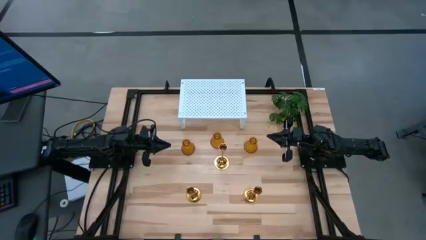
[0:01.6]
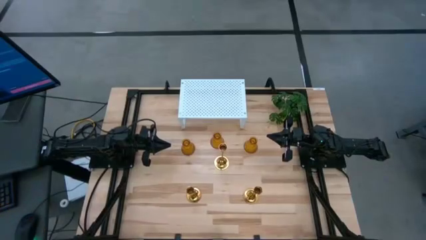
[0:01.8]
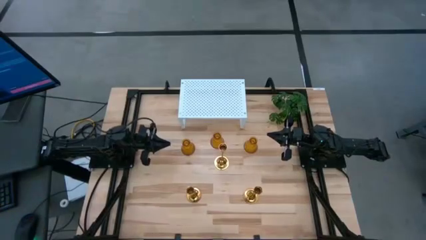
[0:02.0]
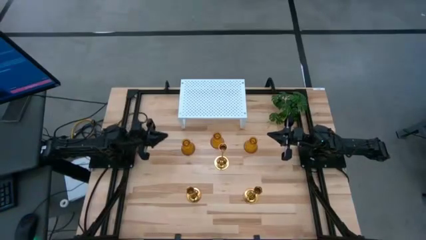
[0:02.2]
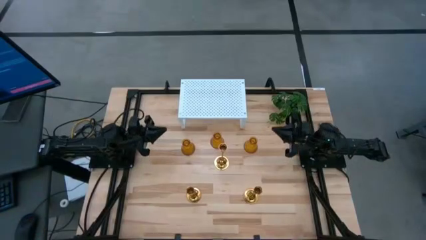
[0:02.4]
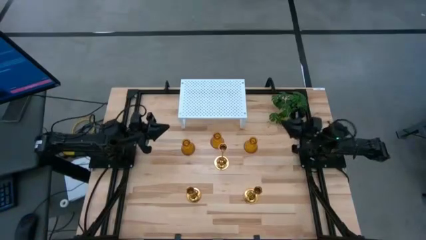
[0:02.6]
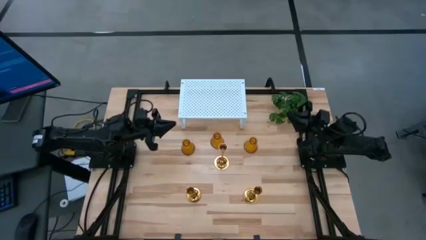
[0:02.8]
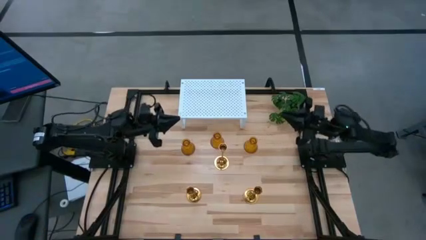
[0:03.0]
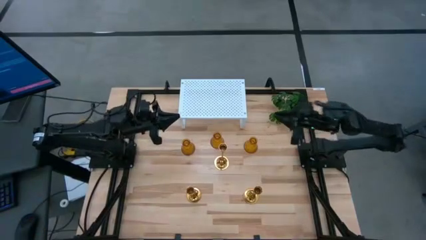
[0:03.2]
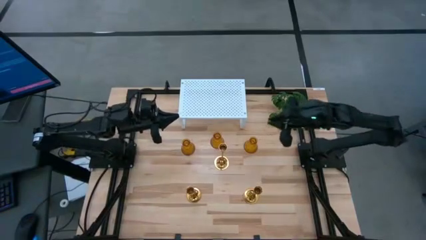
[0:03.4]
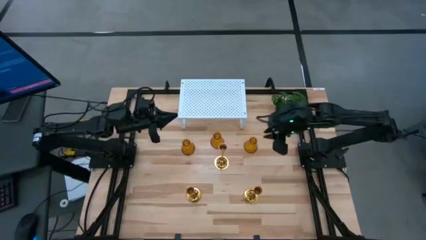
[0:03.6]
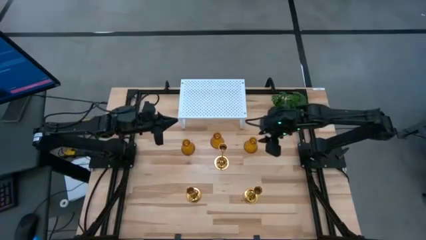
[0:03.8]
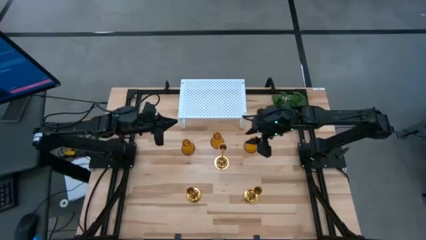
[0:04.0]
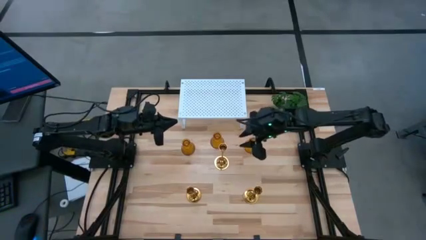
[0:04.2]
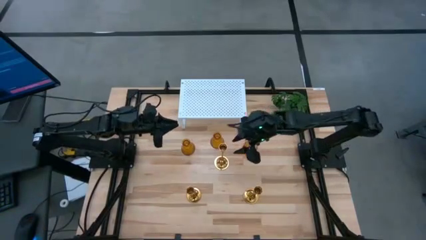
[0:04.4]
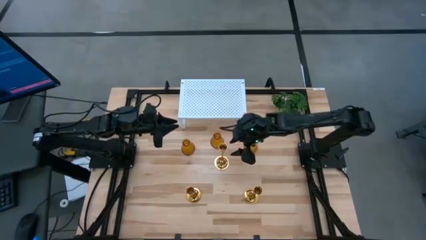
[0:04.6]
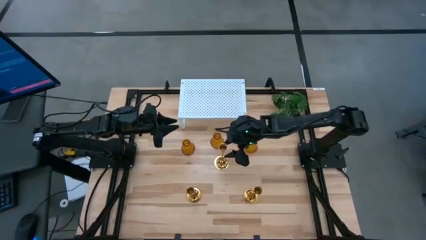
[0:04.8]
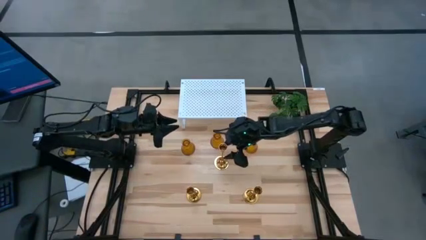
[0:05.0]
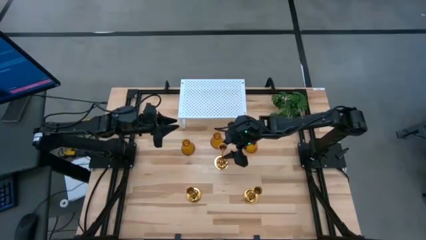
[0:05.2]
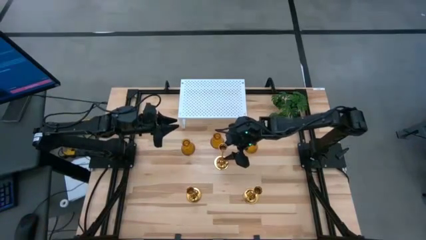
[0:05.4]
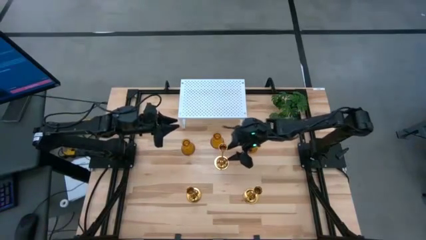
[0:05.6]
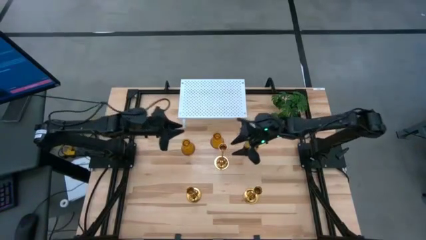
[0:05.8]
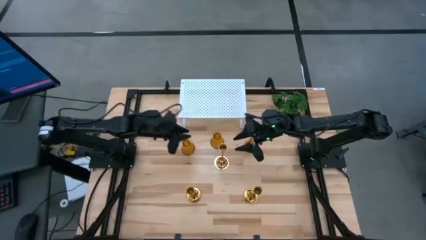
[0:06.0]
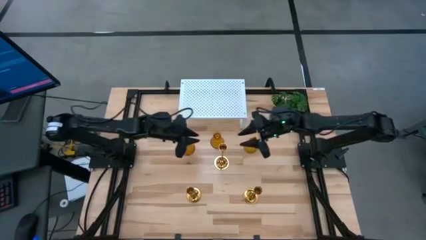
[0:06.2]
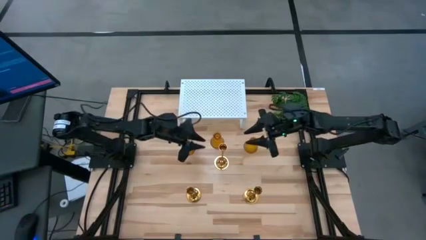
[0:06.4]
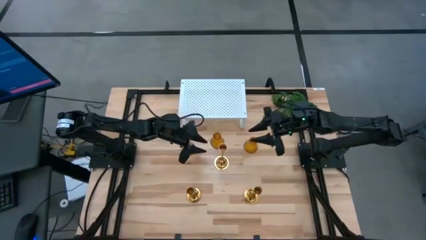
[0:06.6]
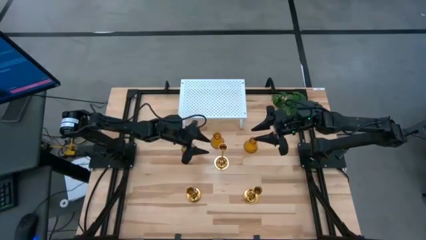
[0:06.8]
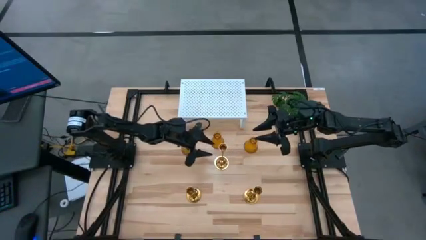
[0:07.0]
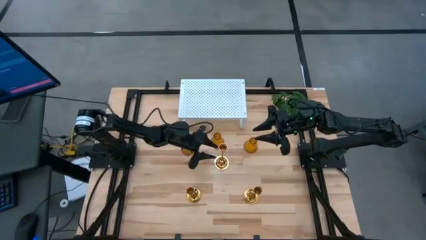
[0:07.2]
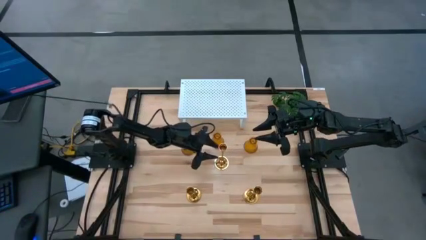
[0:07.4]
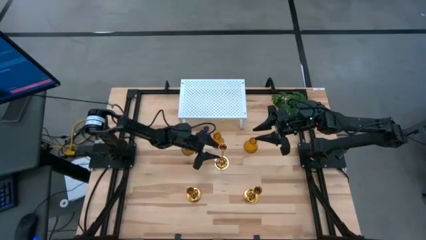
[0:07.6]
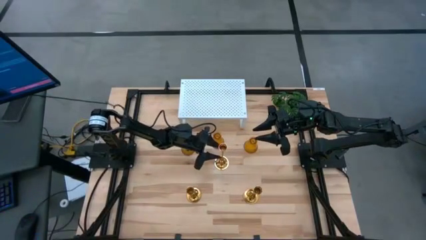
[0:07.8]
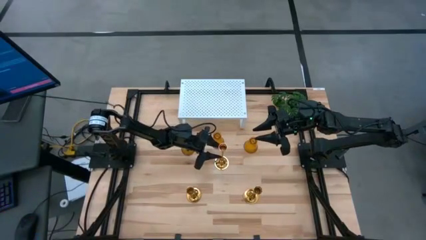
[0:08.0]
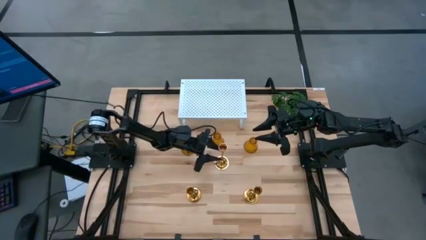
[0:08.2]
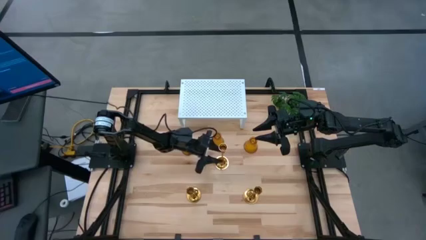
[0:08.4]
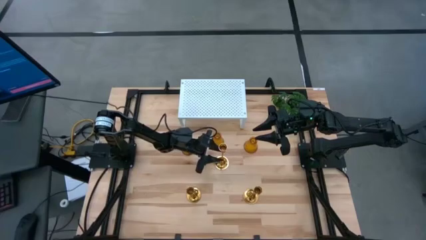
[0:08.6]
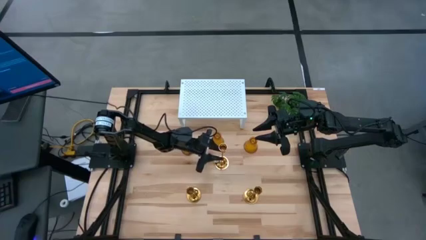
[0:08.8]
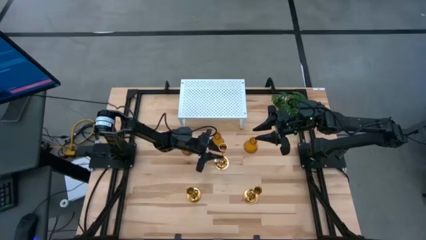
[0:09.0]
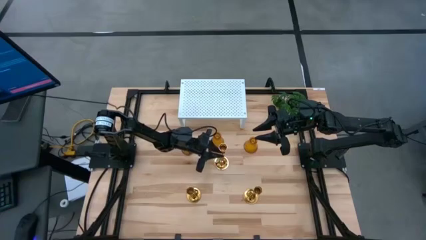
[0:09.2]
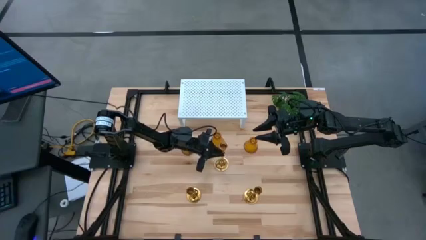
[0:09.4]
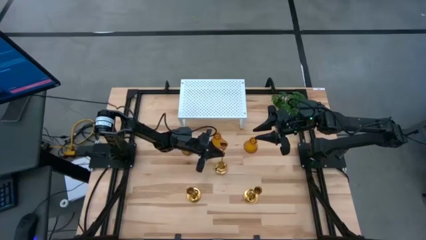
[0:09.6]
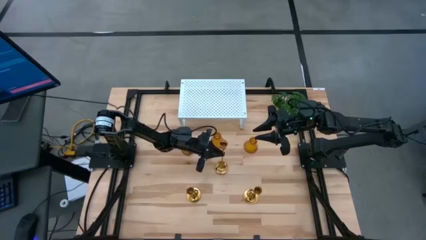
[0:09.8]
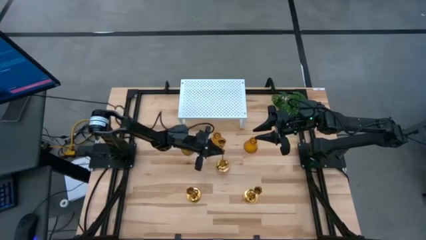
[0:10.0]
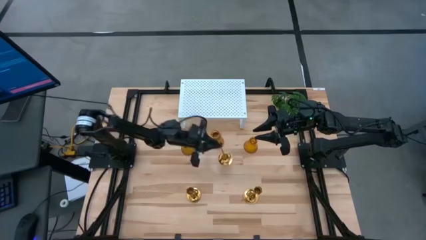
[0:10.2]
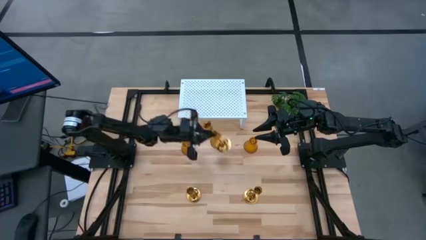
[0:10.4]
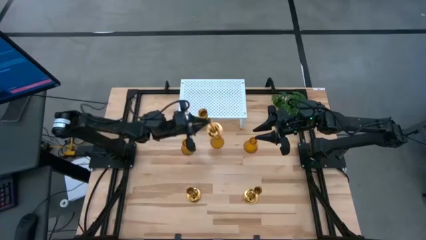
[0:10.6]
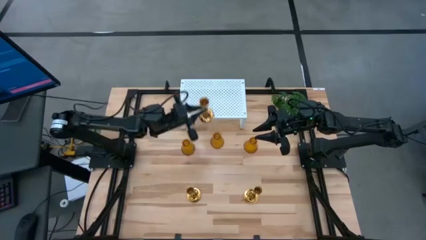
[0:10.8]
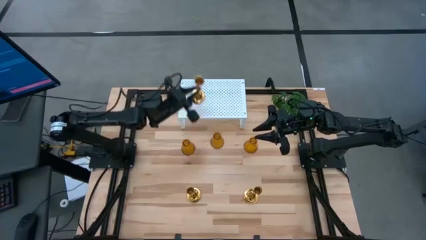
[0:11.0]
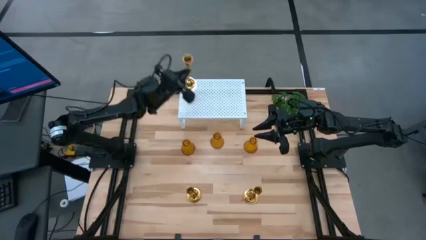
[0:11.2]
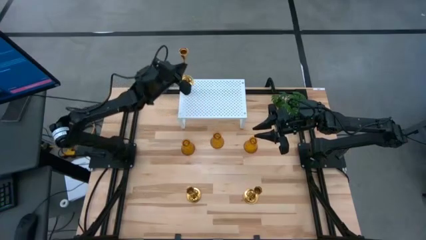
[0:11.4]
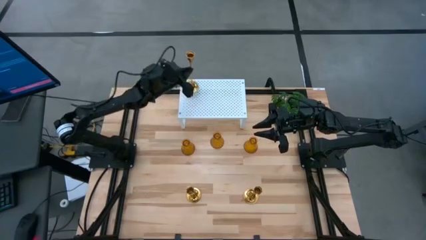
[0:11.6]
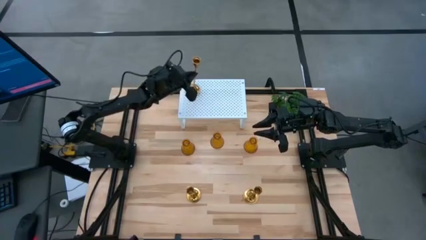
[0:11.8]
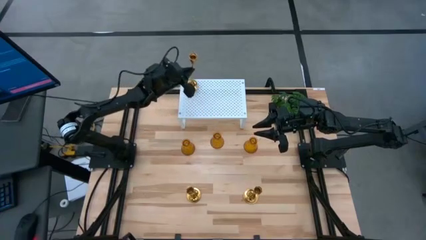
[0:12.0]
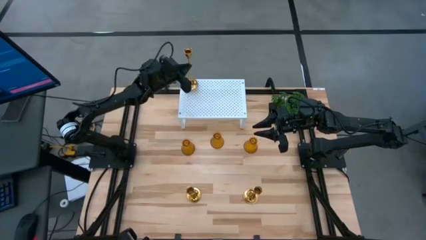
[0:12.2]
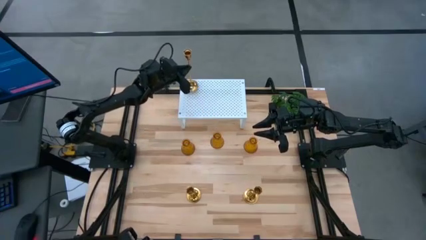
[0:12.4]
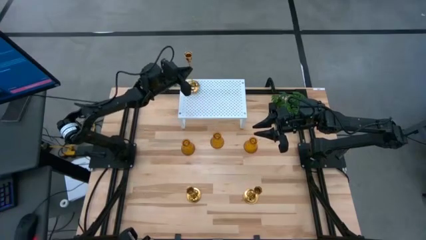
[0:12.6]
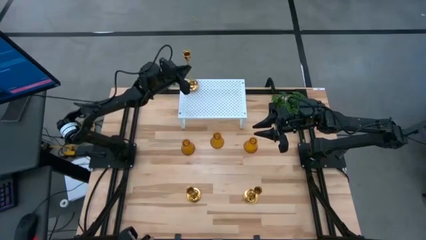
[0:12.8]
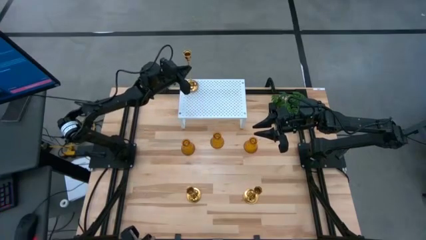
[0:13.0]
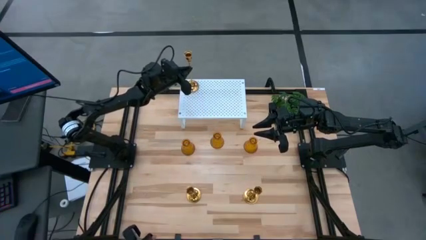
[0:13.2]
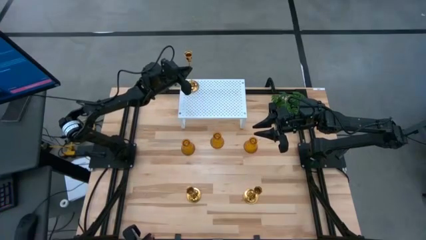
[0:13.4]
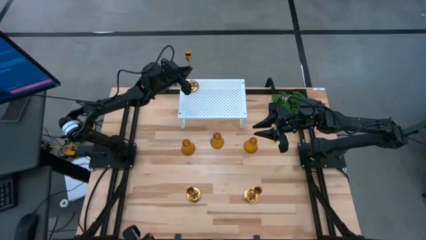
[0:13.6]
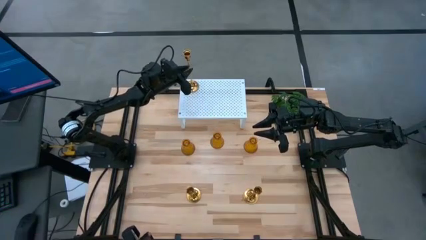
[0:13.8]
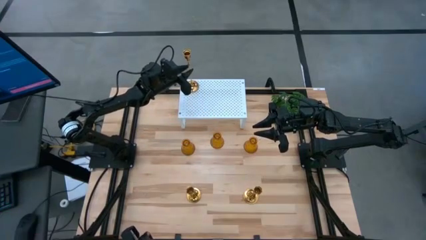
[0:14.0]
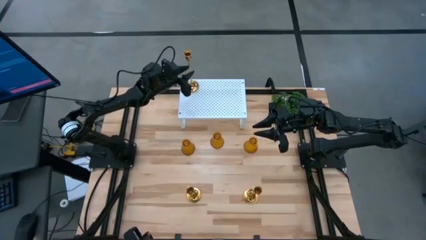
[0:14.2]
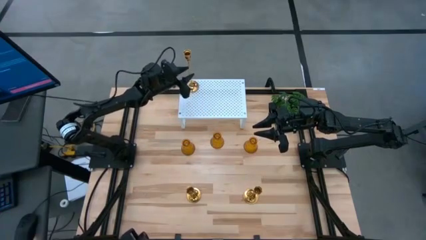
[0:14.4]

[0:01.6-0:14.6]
Task: Pick & Place candle stick holders
Put the top gold candle holder on the shelf
